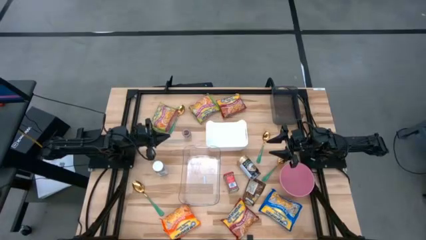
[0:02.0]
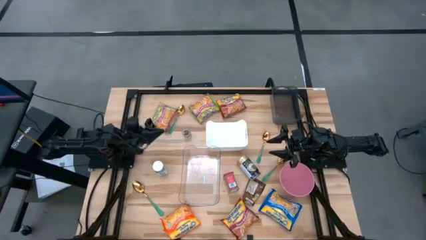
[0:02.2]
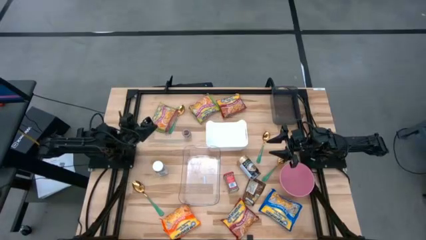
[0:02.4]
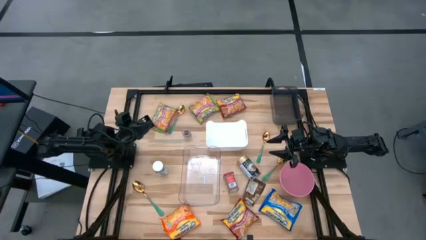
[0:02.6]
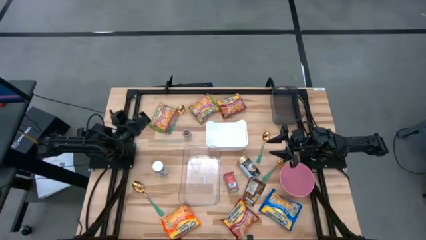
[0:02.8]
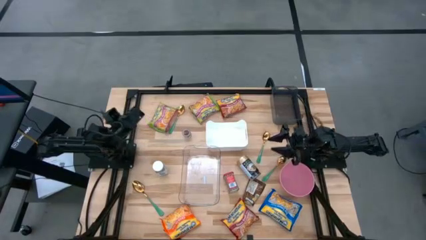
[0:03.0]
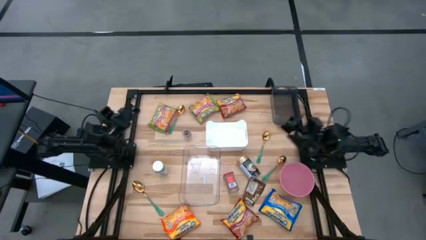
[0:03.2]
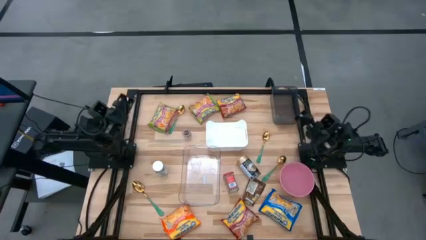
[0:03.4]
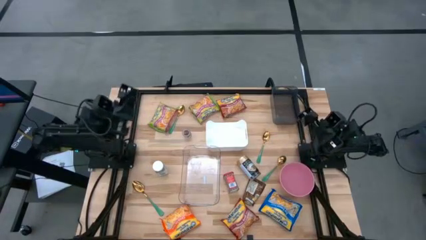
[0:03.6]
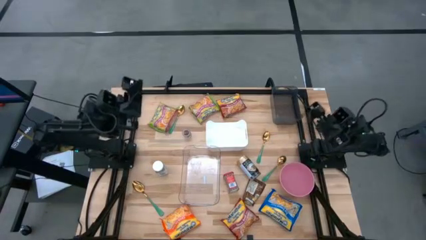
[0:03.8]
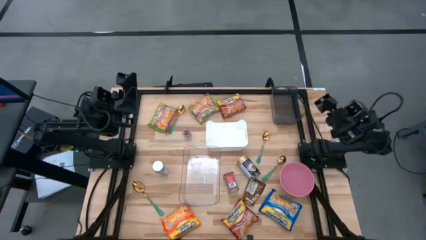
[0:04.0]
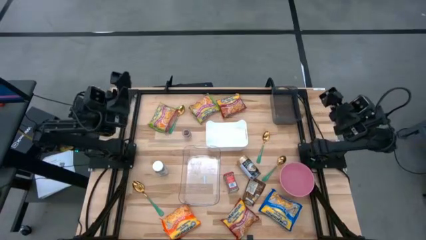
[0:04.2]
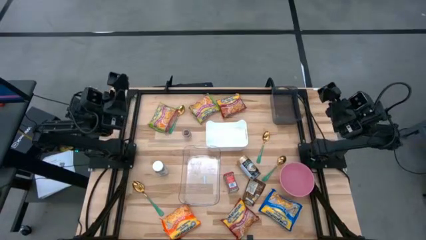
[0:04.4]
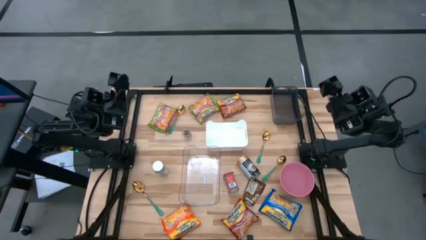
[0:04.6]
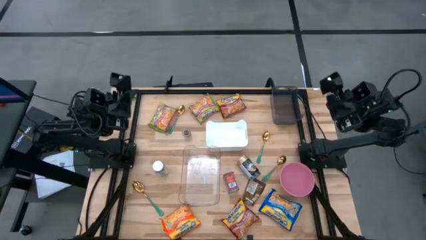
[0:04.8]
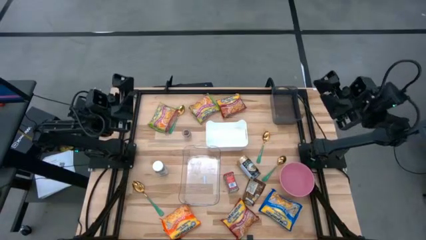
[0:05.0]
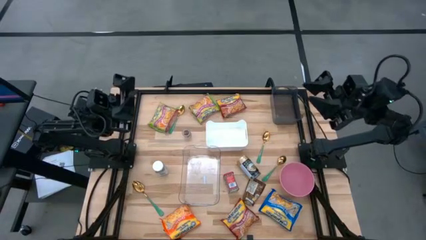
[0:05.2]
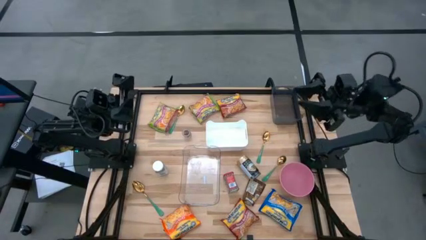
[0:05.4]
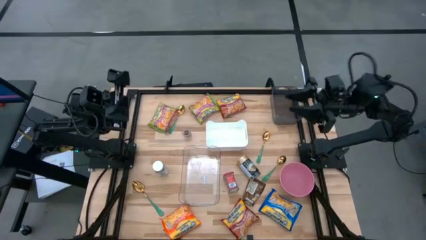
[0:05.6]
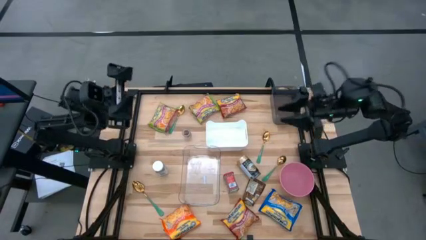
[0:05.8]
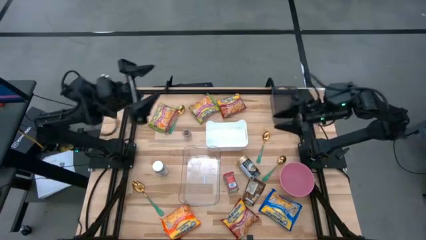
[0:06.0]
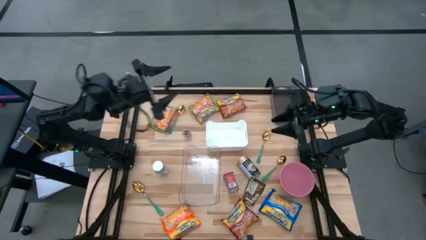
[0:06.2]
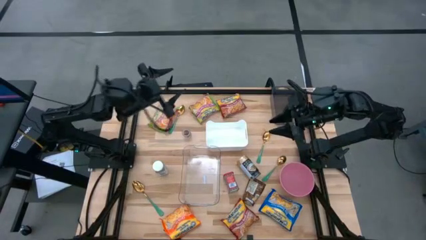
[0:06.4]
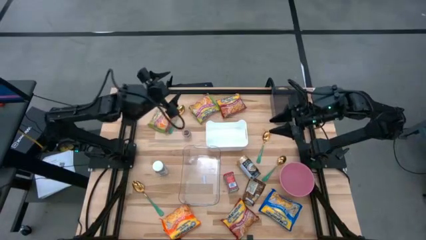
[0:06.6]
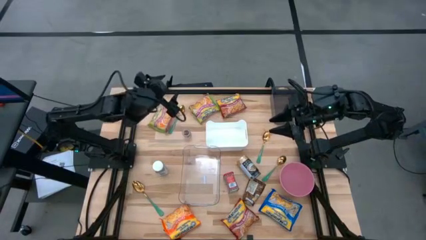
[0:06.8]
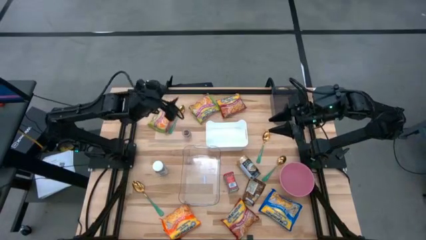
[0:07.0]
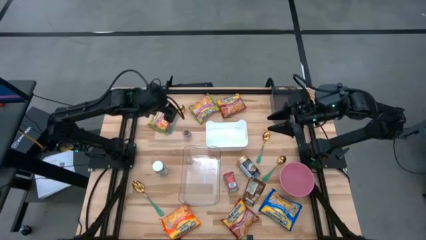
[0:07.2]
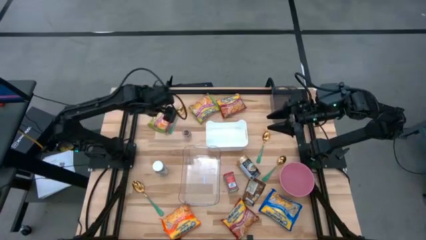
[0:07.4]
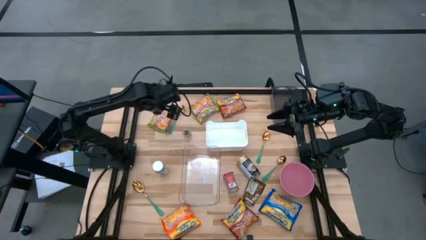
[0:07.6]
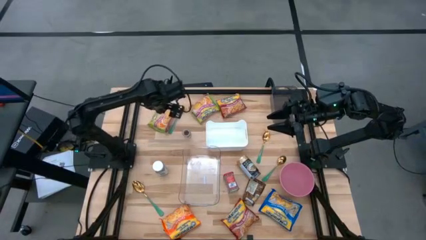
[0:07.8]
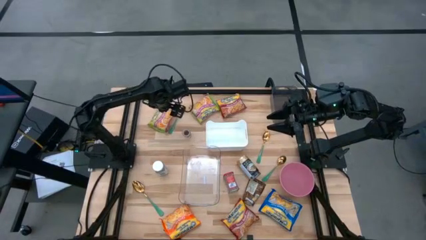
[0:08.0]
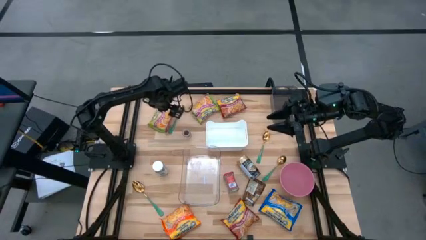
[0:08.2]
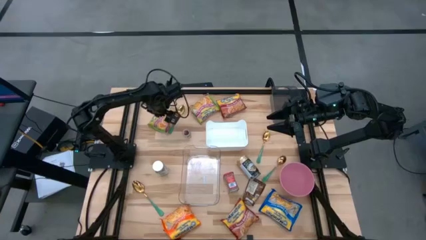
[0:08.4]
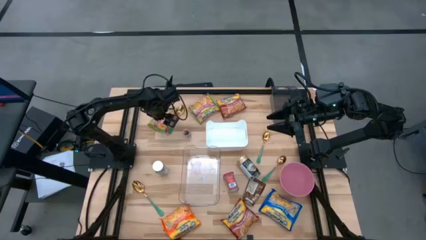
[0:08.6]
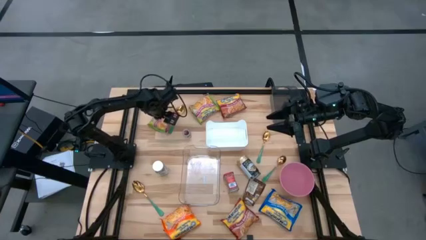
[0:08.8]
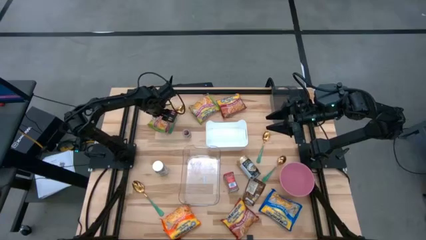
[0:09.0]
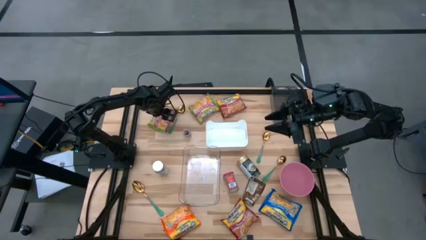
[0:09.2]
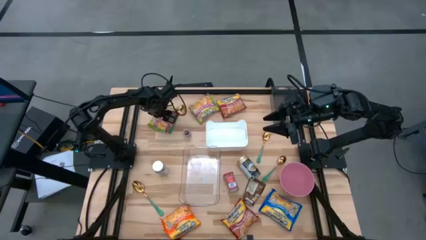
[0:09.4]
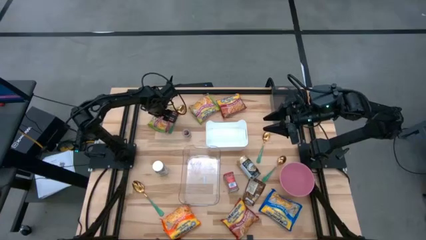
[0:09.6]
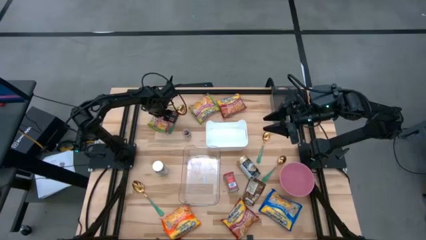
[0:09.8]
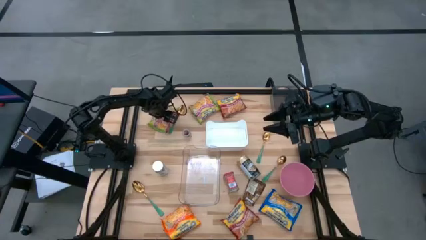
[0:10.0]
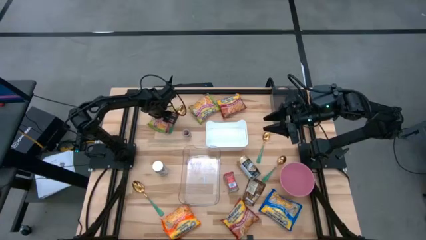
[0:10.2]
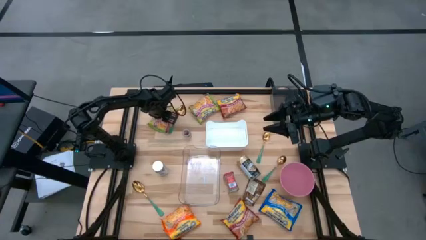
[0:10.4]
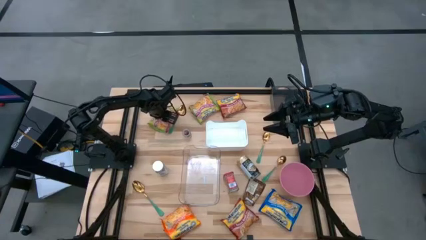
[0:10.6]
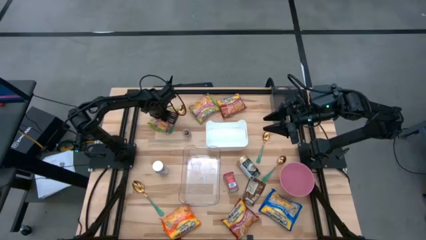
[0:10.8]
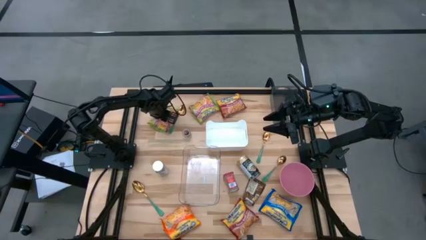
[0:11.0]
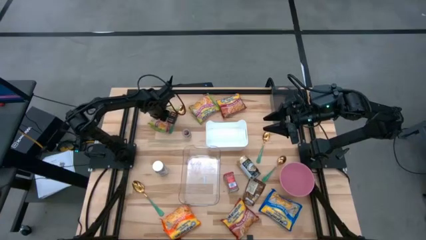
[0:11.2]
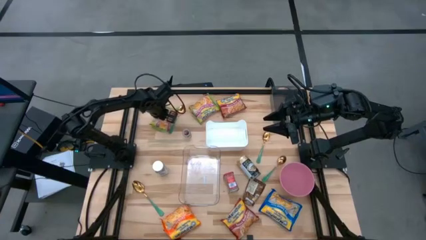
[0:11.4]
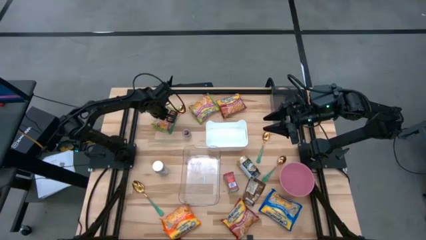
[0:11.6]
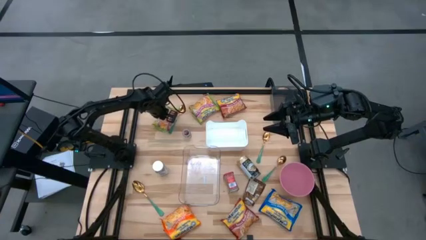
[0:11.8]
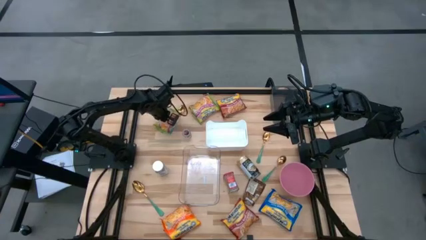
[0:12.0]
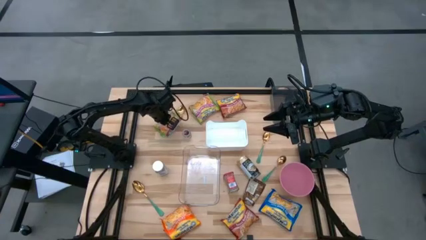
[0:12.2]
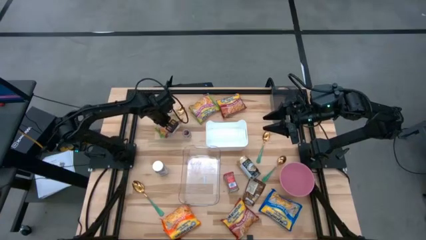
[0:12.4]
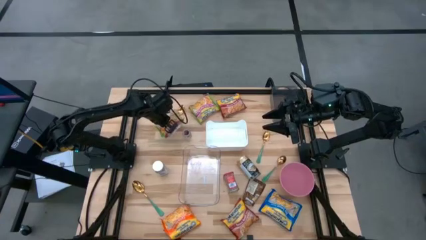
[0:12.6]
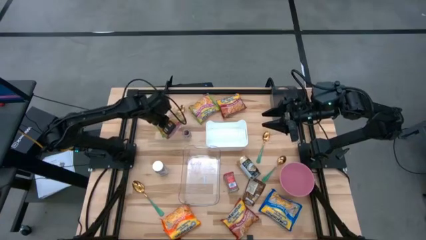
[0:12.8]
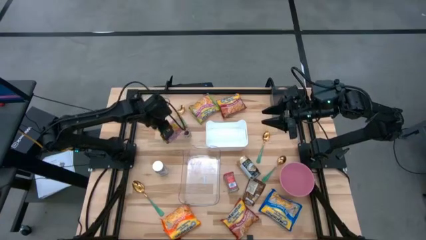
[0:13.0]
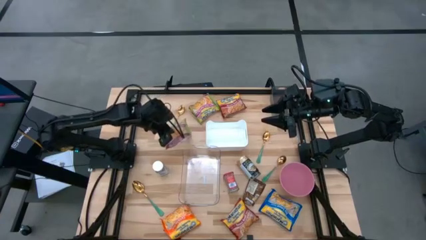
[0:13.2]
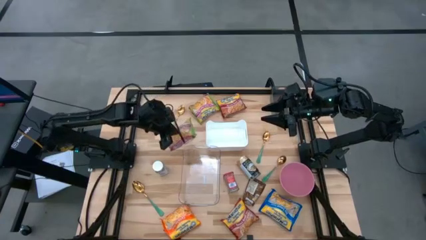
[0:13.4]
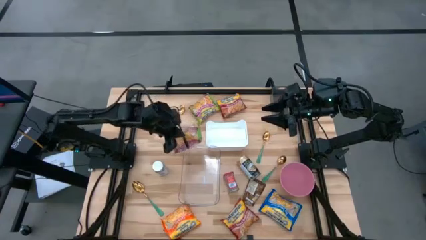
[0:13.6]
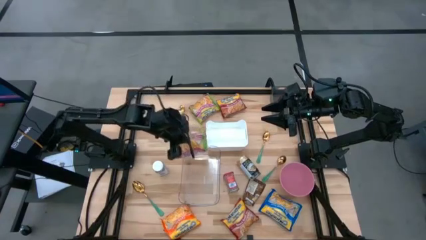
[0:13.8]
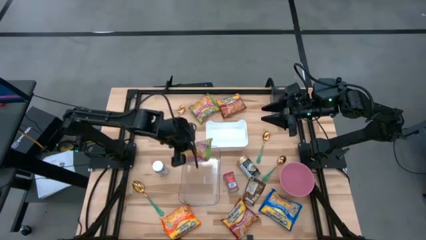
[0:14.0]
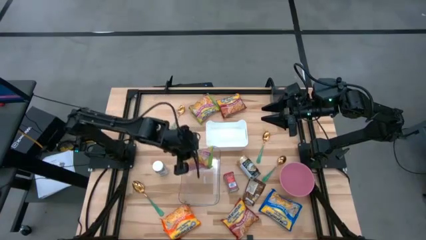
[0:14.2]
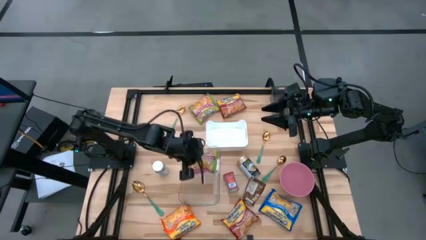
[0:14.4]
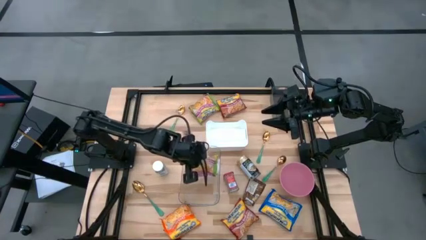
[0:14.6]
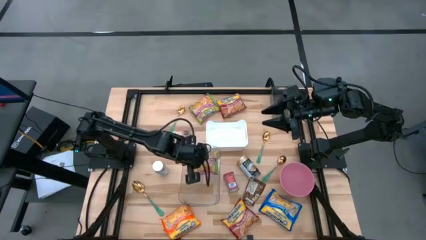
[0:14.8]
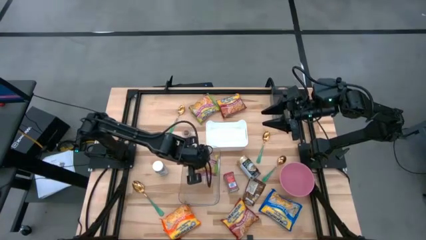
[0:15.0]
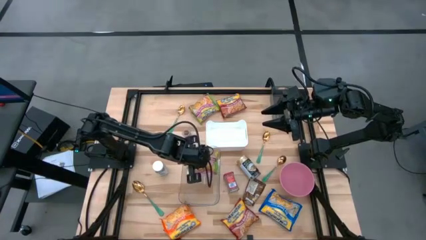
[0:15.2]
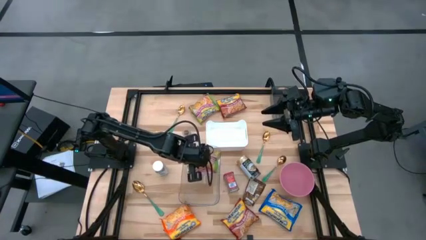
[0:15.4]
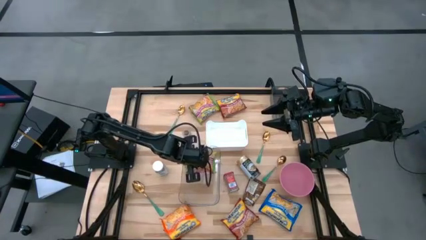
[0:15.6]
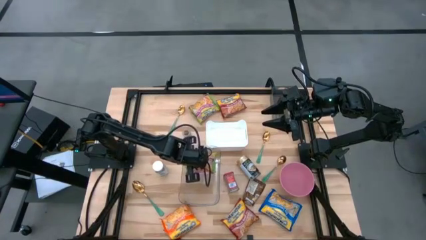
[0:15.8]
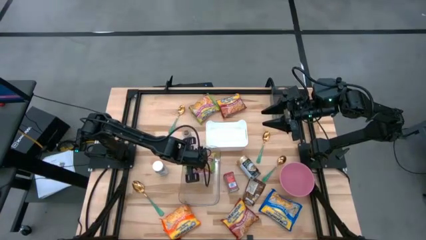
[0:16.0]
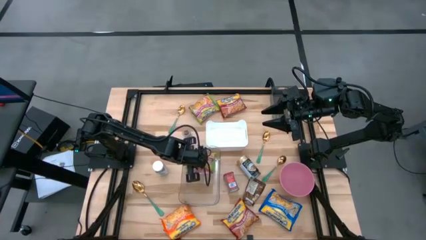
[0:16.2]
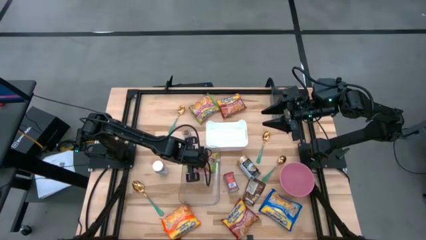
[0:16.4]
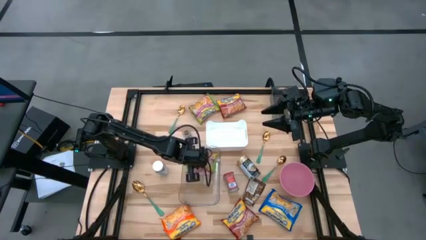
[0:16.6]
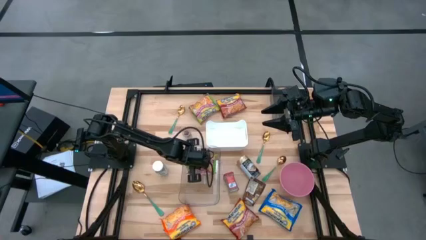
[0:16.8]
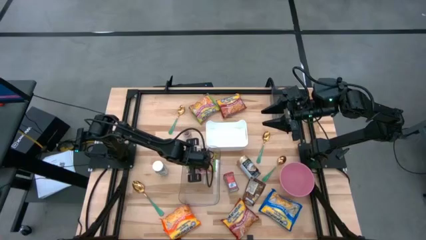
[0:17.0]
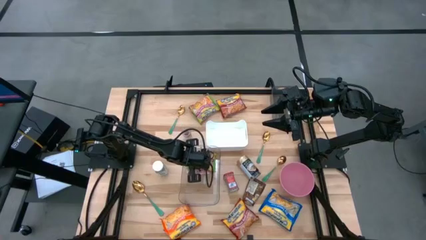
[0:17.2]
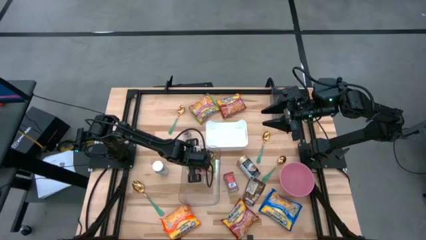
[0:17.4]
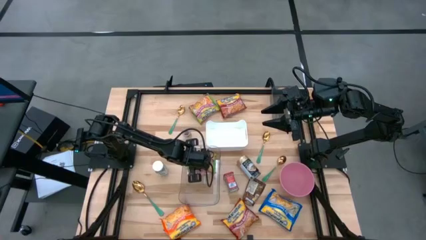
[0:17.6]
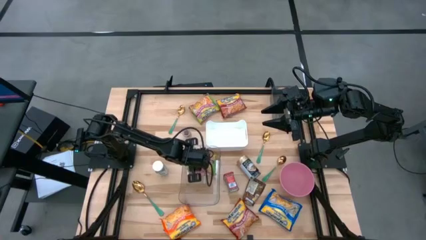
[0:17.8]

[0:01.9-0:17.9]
Task: Pick & Place Food Item
Put the green noodle pack into the transparent bin
